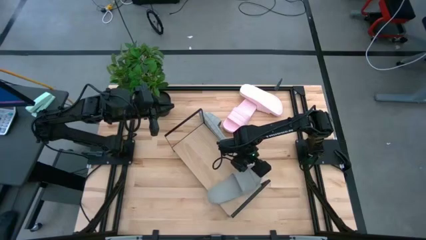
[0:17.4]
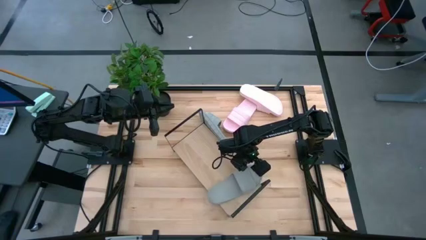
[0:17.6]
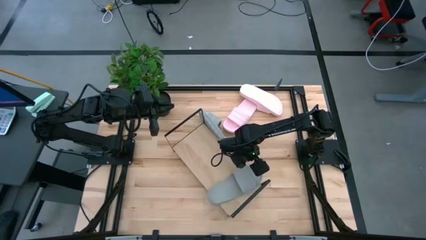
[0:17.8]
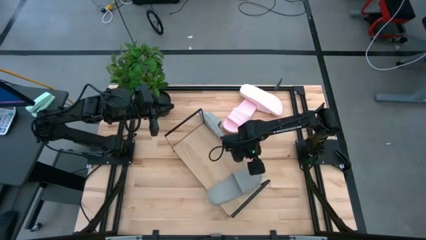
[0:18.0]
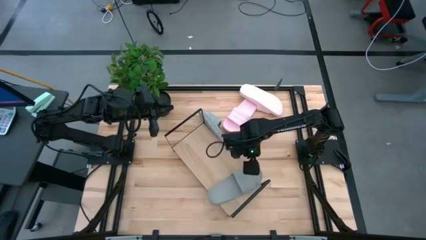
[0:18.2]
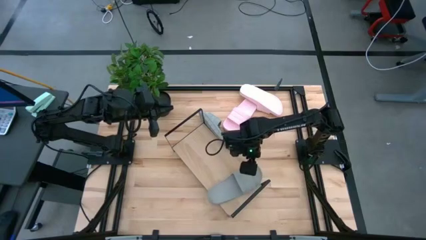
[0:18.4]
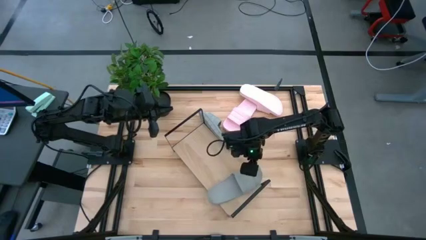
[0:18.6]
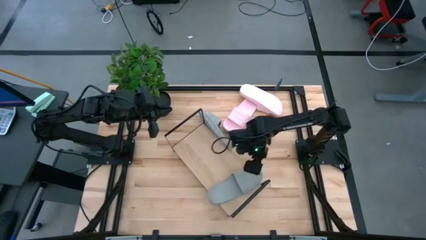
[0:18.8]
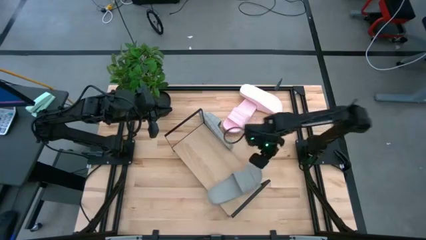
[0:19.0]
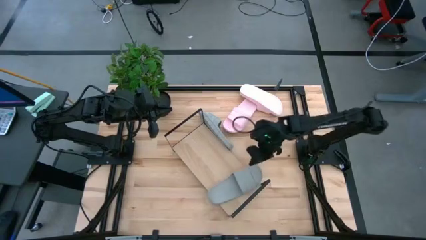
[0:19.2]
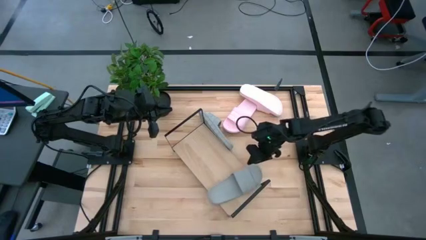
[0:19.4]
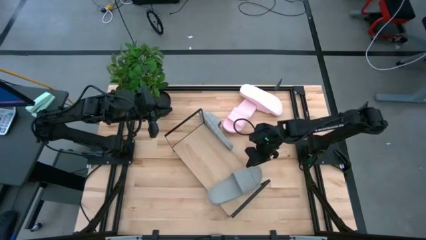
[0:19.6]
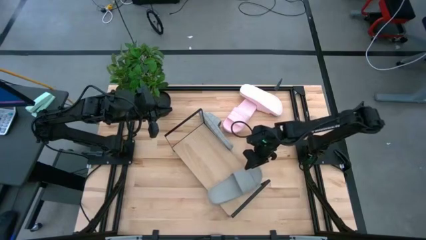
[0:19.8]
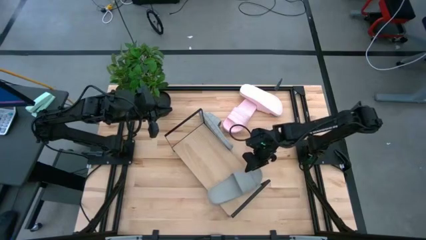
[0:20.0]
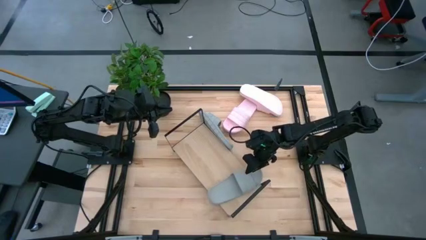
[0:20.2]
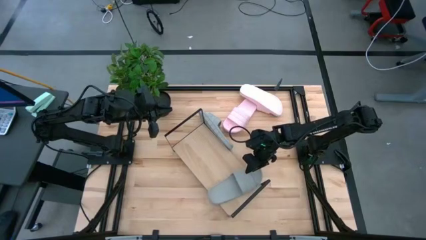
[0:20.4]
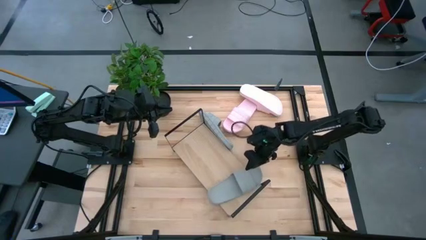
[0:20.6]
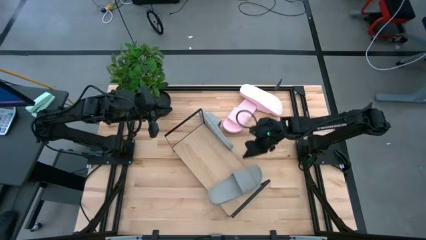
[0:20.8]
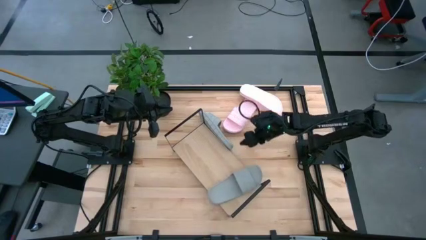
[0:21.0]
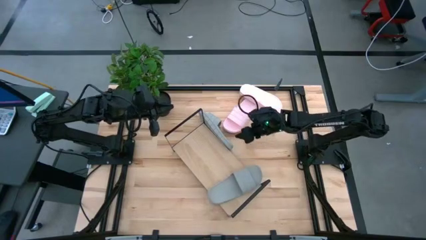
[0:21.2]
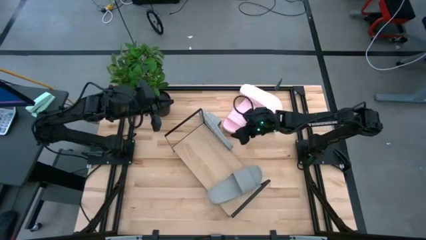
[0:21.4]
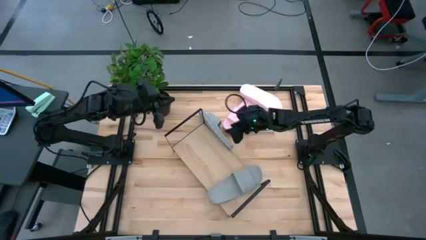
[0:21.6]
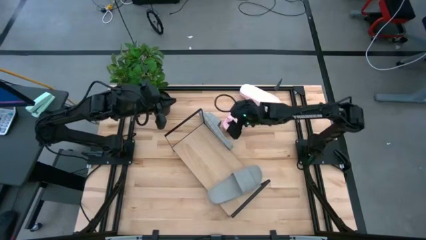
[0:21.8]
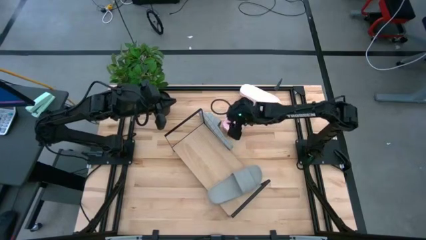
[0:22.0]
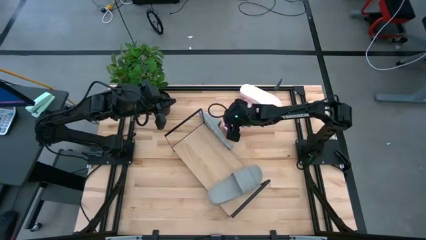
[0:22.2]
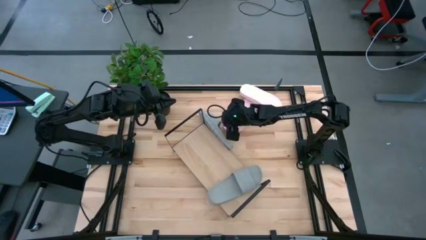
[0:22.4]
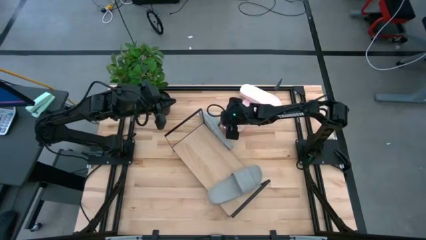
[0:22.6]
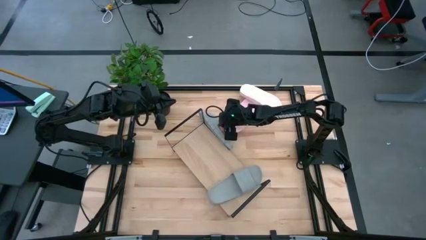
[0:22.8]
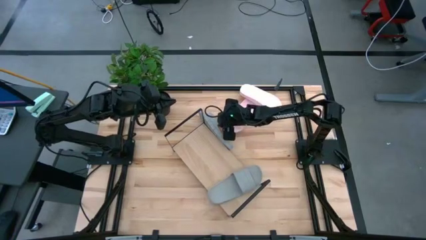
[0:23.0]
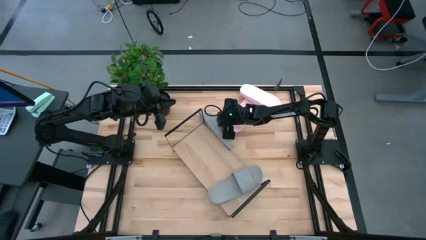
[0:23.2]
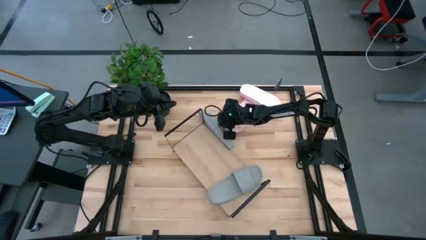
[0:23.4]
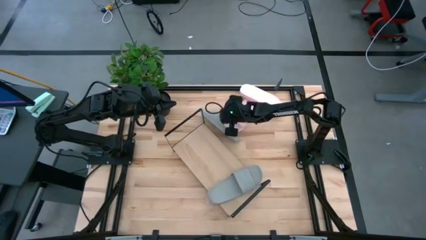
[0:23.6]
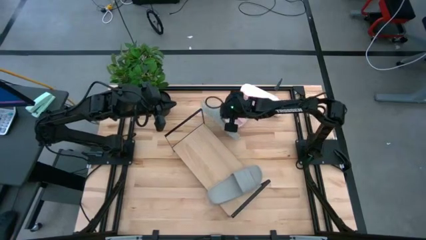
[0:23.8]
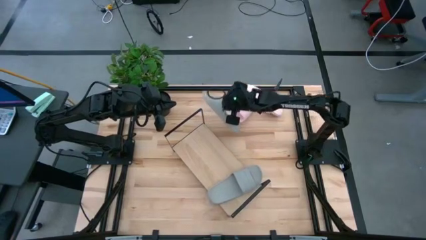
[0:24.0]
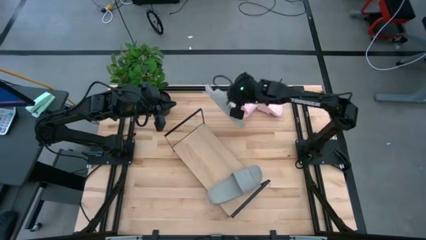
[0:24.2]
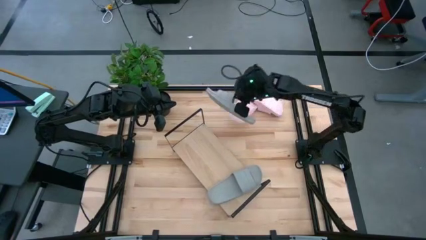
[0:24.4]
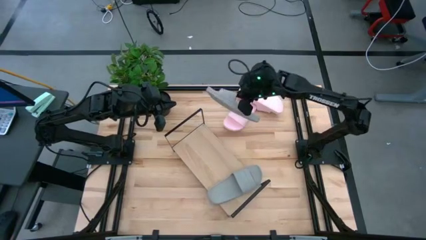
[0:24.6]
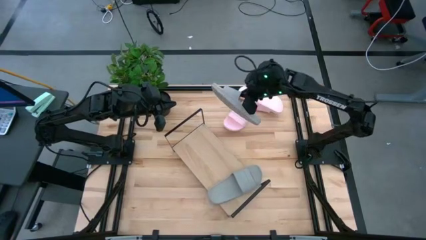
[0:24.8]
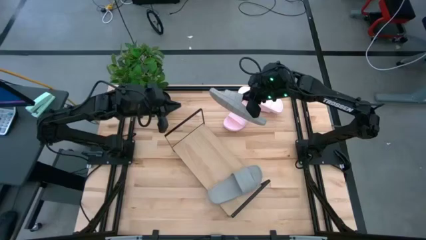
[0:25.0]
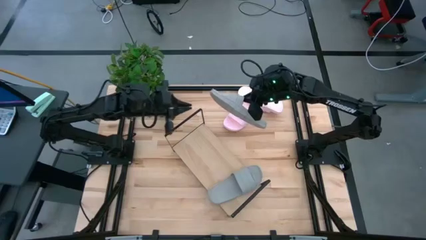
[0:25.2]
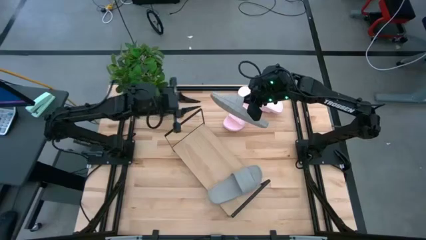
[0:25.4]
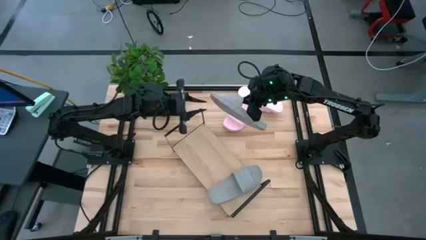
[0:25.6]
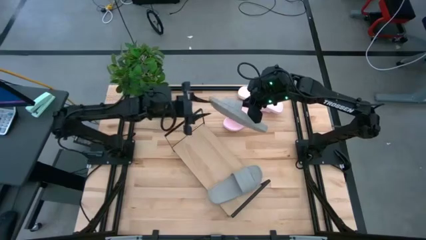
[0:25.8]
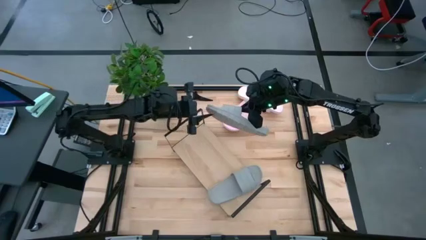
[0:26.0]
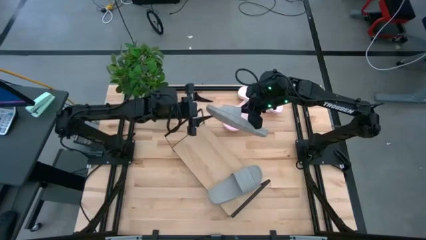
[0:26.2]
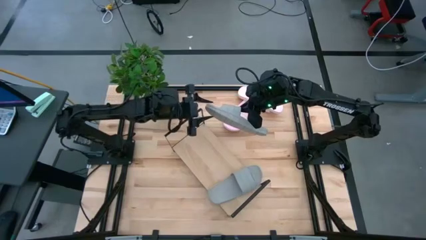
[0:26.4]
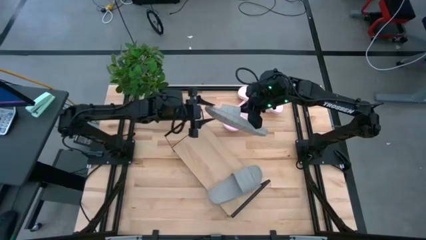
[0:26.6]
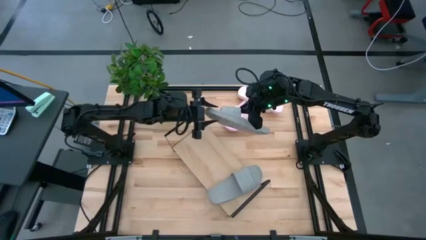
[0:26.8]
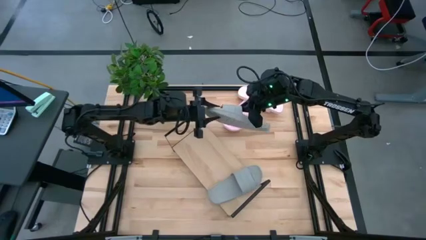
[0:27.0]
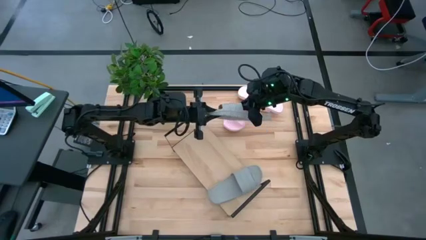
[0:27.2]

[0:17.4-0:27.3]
Task: Pick and place slides into the shelf
Put the gray slide on the shelf

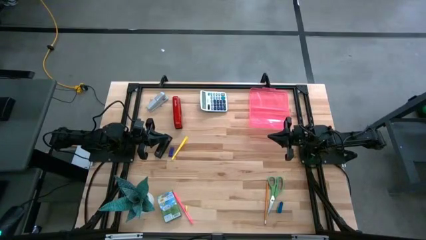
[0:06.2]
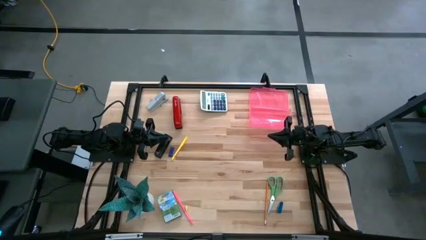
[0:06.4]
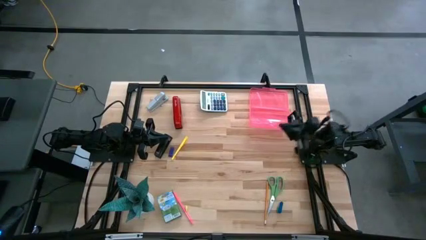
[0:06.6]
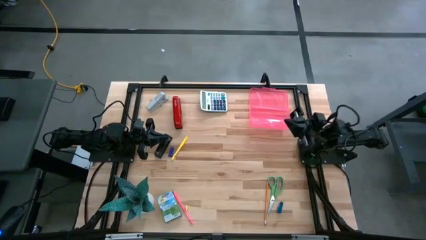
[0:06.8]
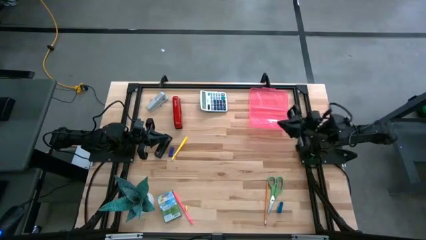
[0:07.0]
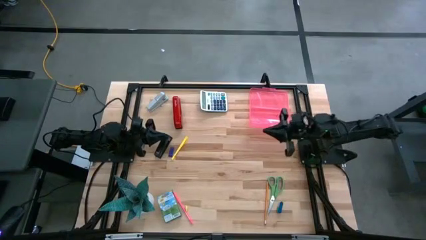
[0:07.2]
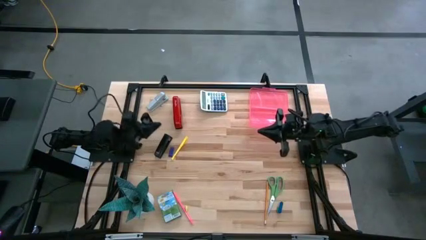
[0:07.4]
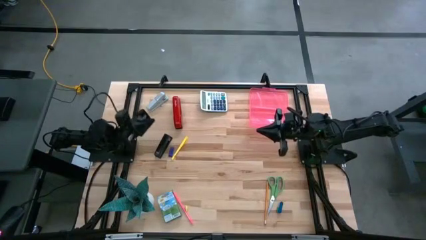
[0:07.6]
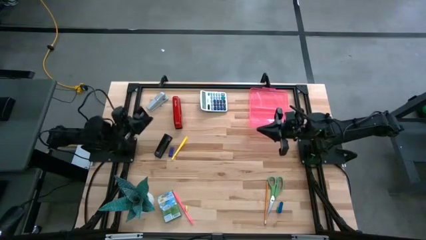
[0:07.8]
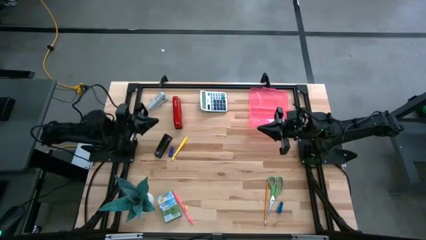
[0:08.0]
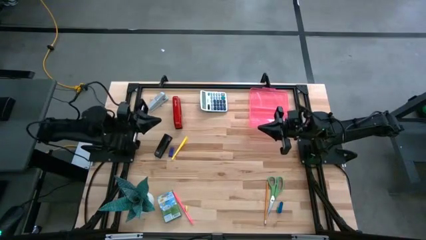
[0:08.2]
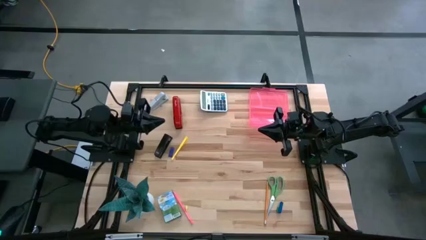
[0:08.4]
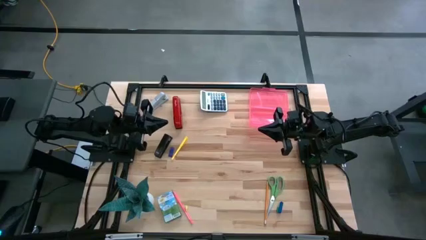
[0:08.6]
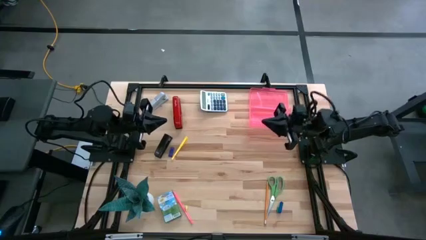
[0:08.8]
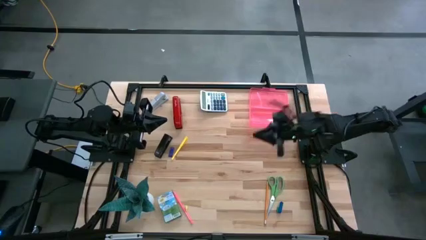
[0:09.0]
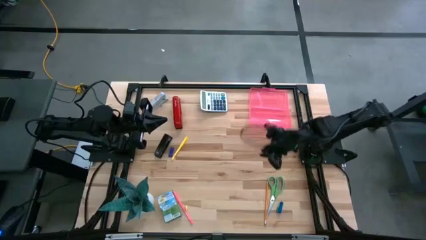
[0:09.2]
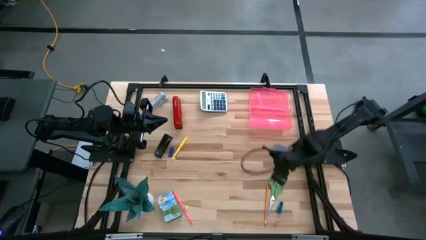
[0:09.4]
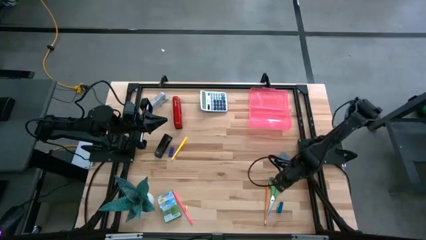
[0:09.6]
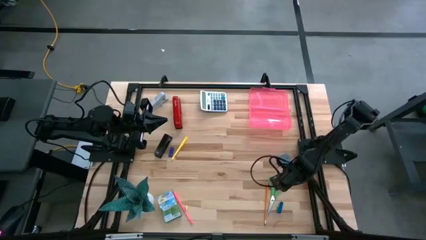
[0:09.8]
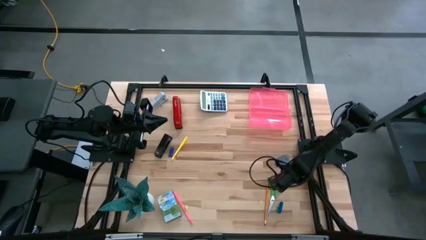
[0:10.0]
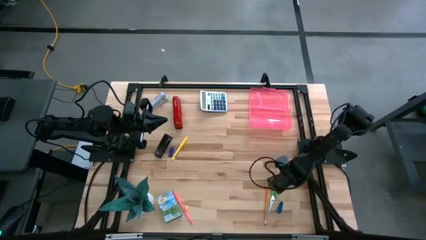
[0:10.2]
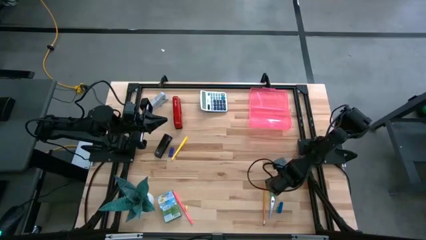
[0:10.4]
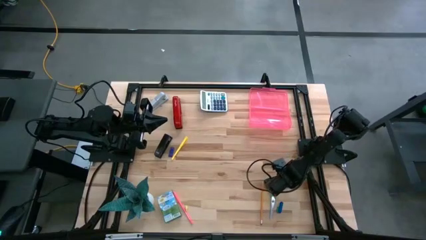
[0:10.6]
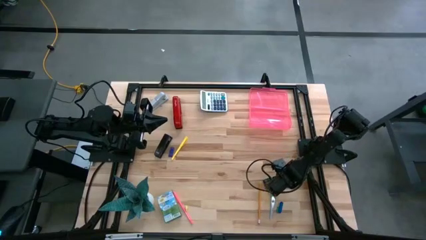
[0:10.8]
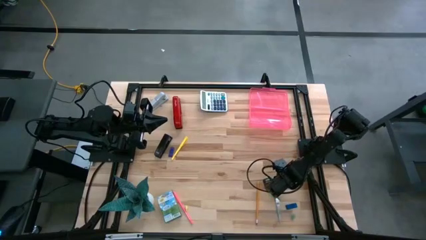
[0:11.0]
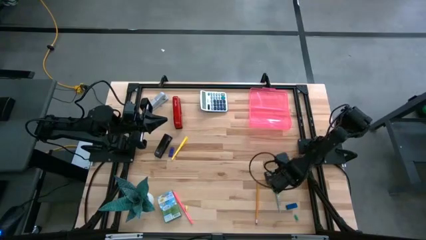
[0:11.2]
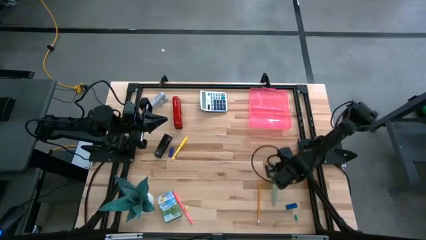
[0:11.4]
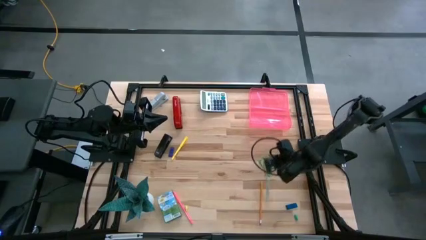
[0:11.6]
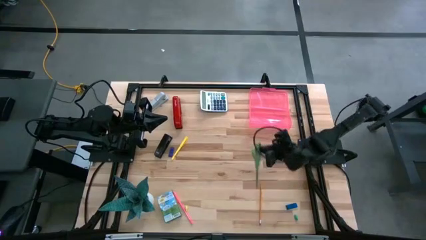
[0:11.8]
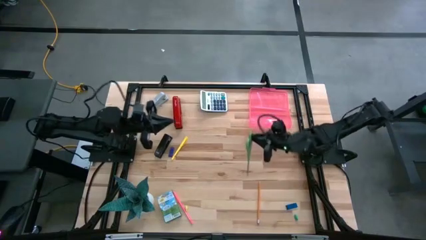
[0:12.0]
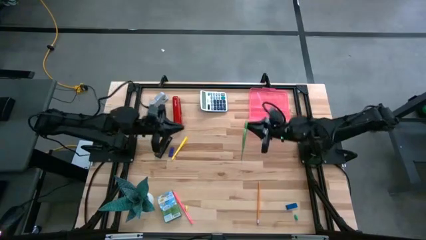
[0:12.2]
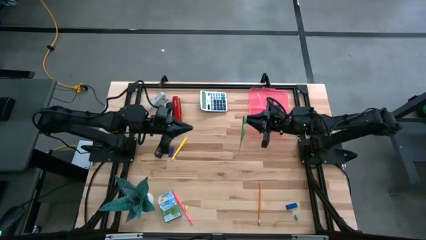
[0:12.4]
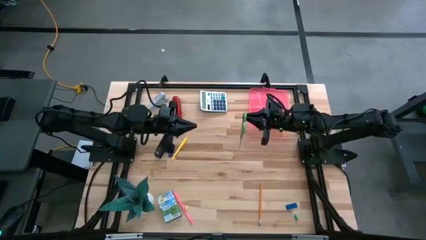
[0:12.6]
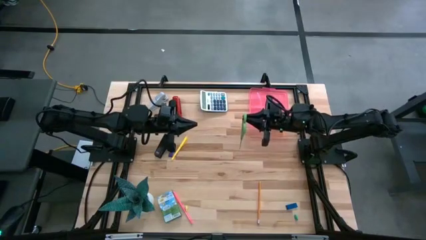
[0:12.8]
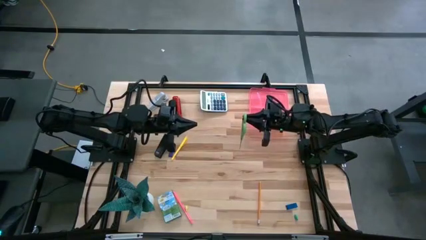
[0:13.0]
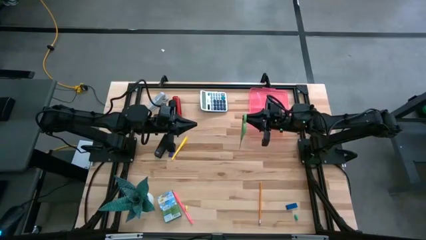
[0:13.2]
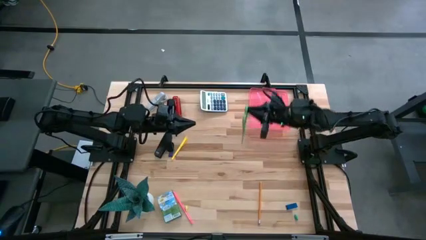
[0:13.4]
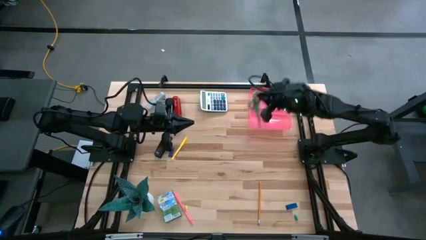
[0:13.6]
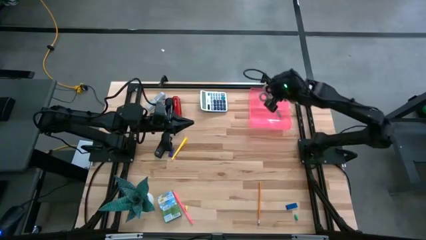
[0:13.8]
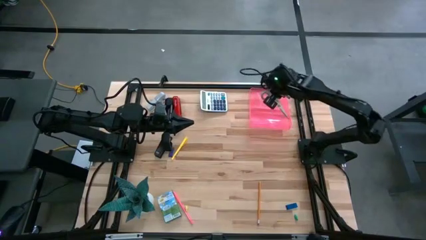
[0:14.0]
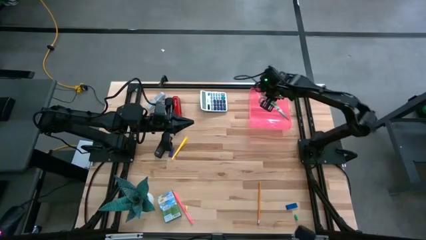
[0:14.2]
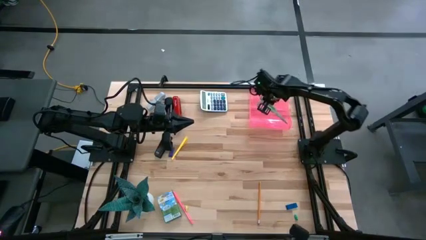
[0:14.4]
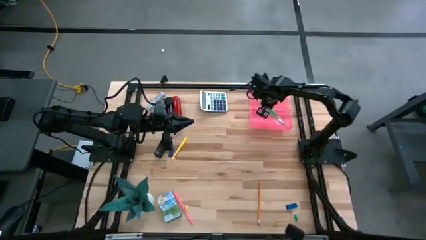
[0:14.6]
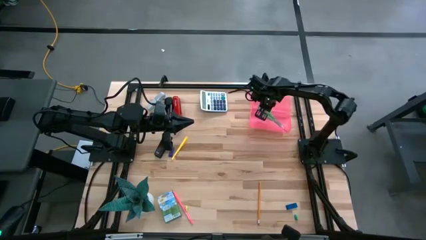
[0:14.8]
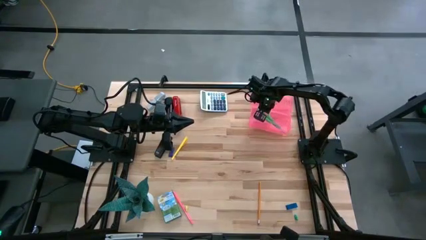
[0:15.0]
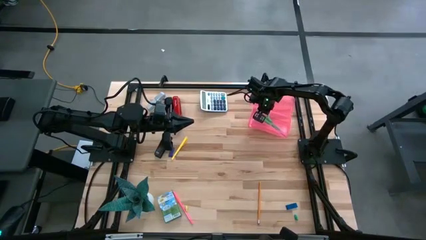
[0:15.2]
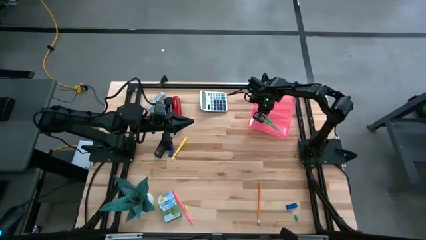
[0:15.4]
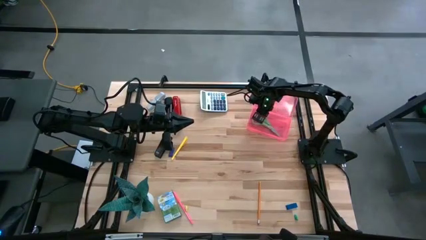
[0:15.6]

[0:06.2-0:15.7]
Task: Pack school essentials
Put the green scissors into the pink supply box
